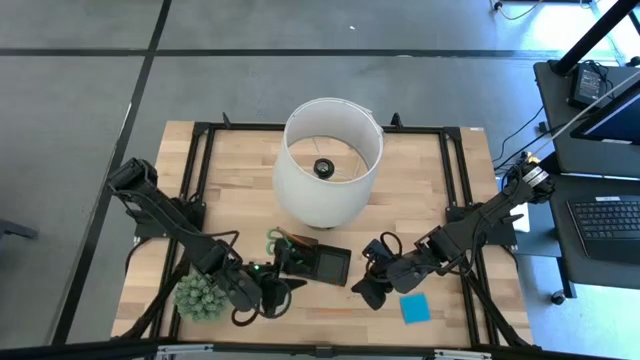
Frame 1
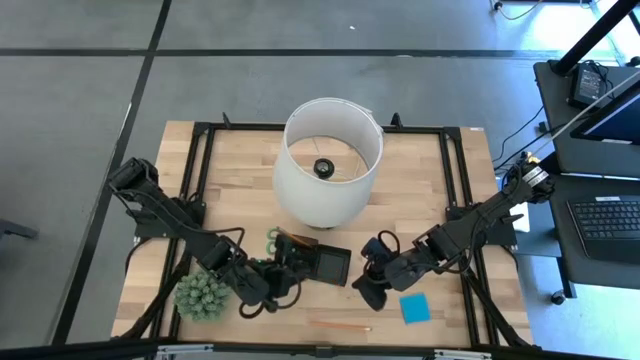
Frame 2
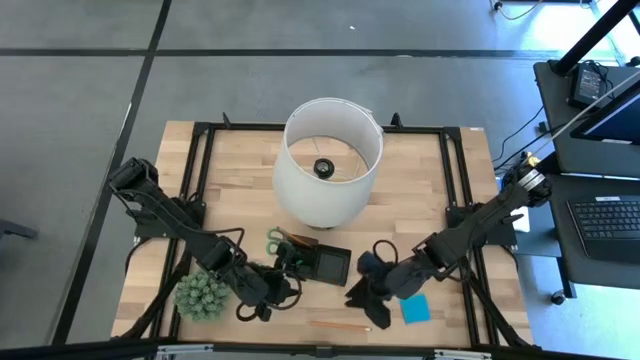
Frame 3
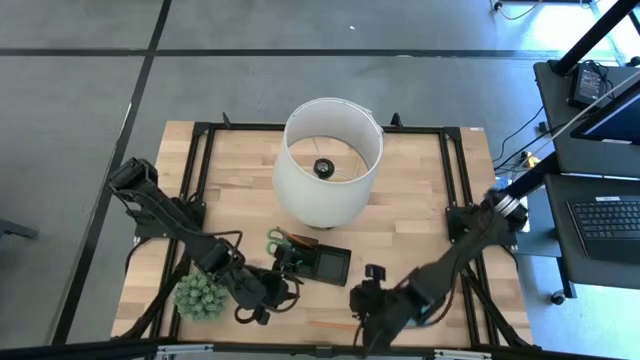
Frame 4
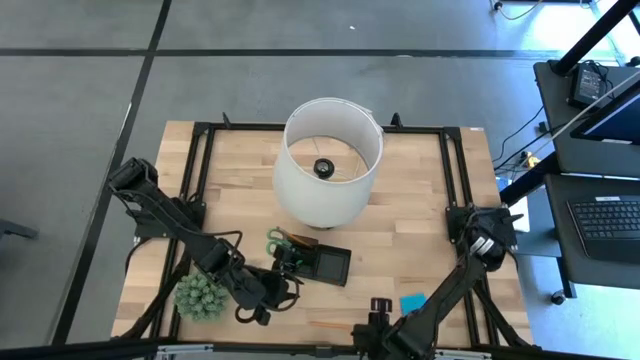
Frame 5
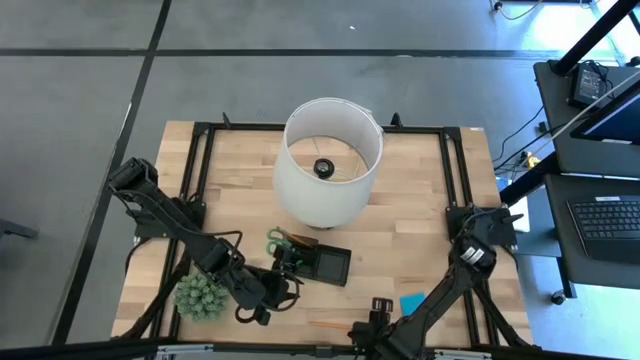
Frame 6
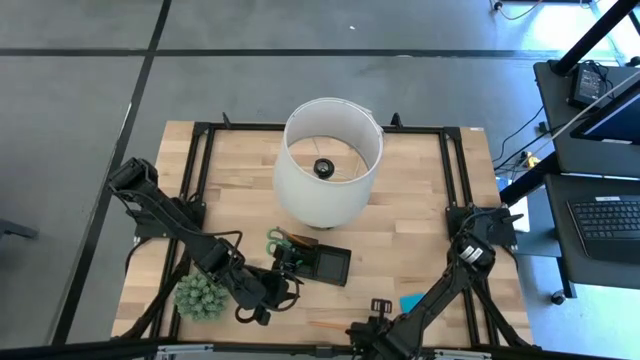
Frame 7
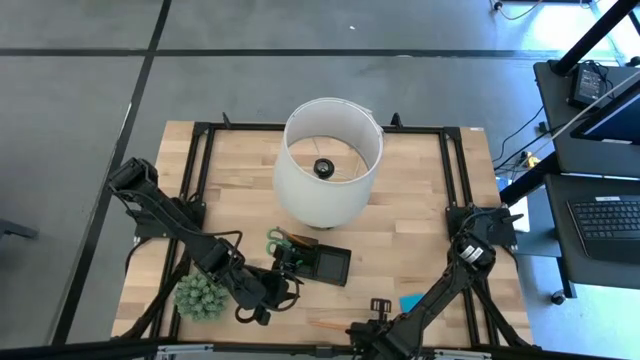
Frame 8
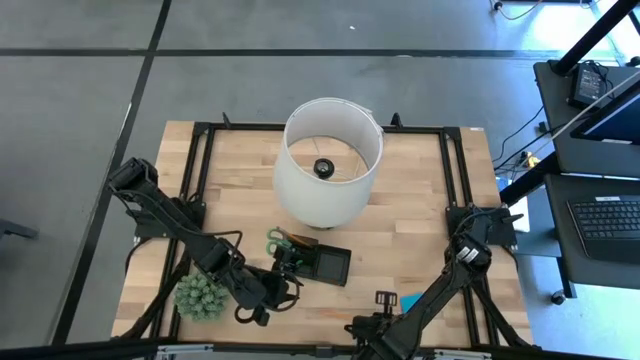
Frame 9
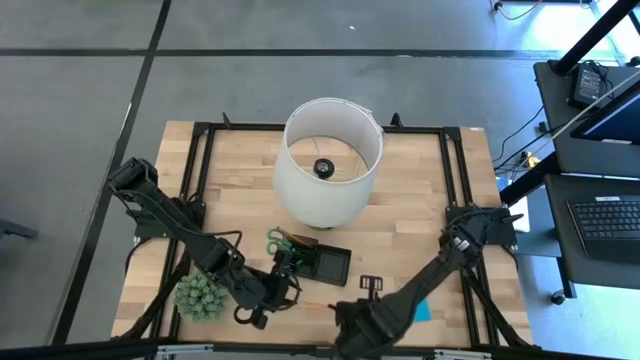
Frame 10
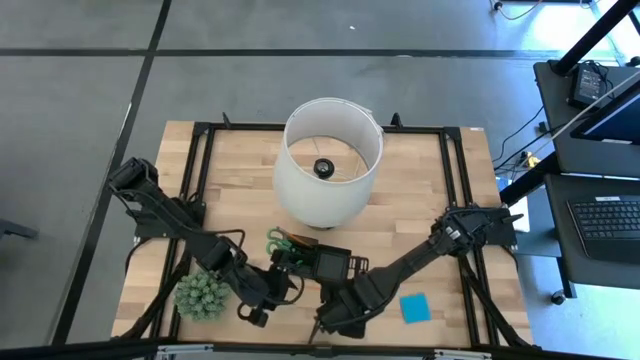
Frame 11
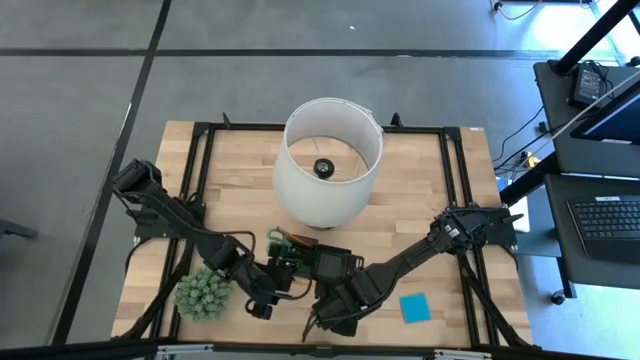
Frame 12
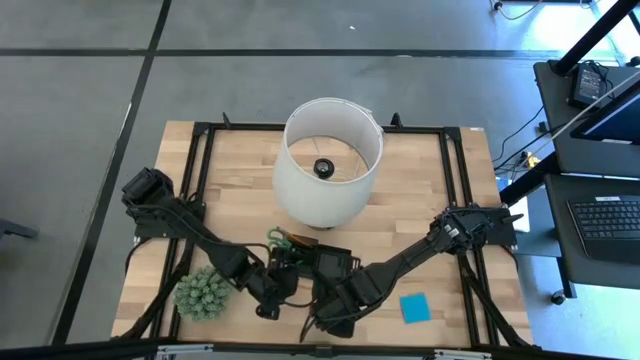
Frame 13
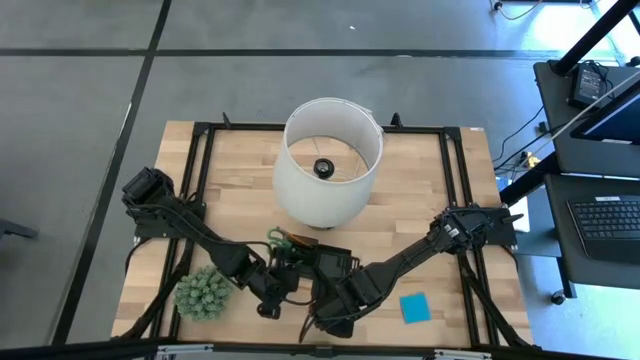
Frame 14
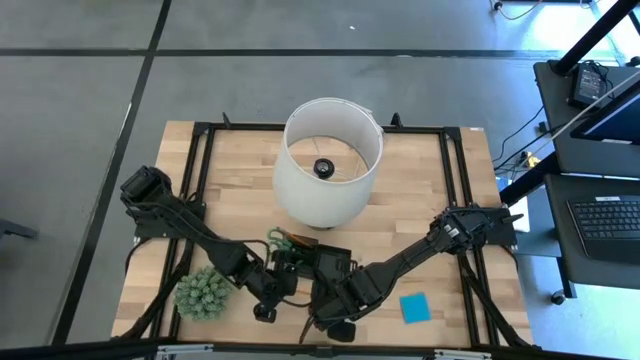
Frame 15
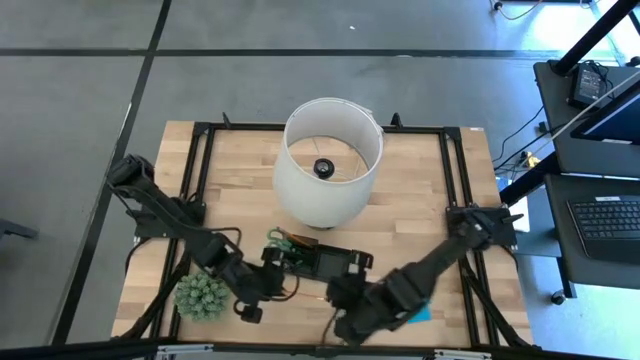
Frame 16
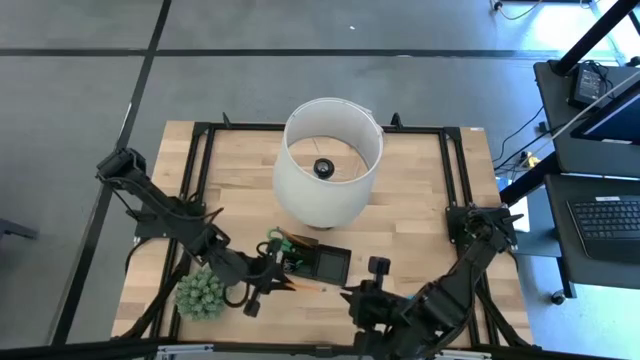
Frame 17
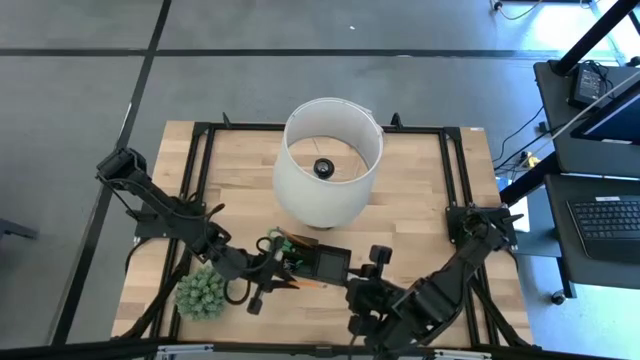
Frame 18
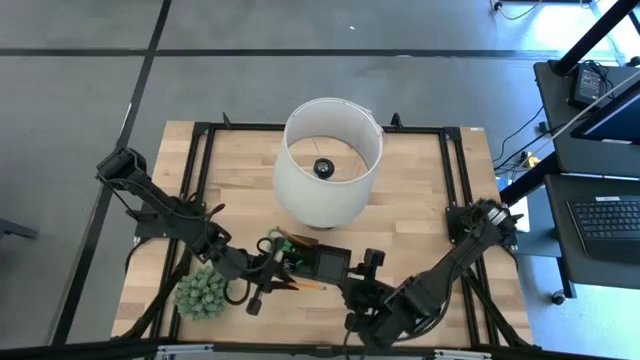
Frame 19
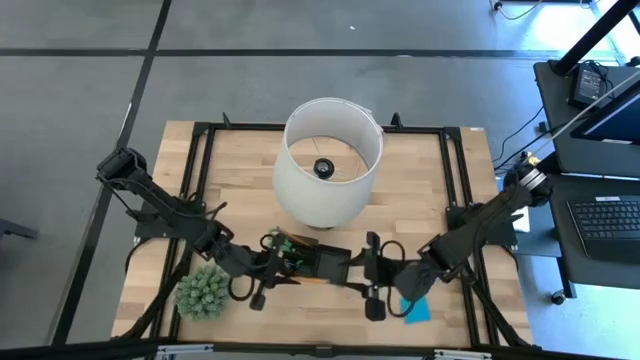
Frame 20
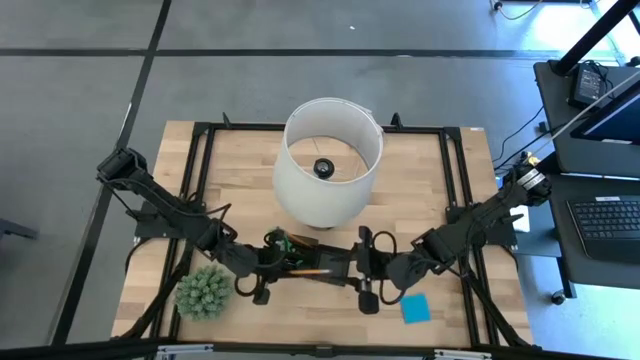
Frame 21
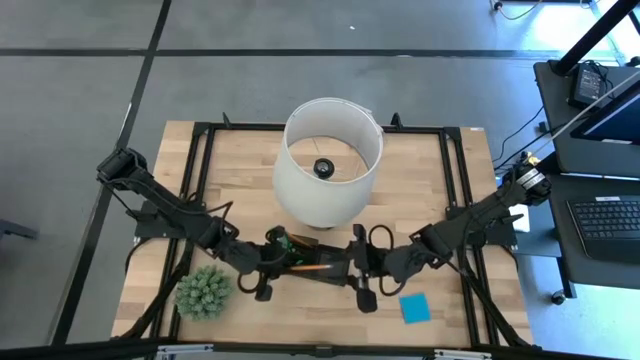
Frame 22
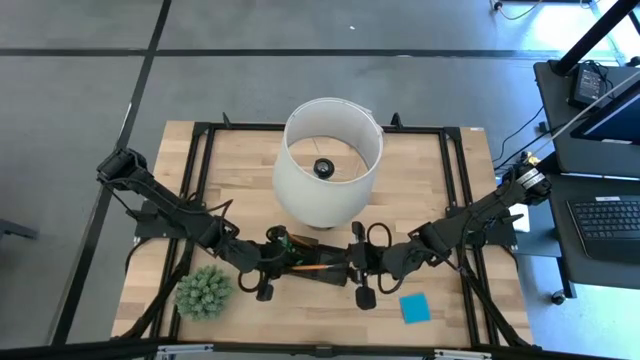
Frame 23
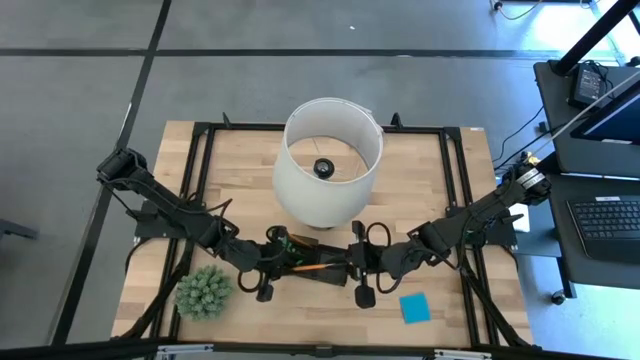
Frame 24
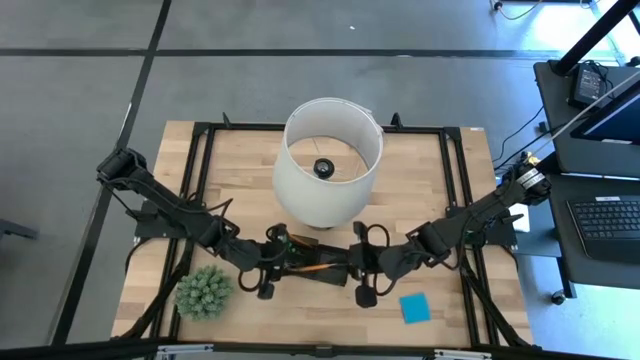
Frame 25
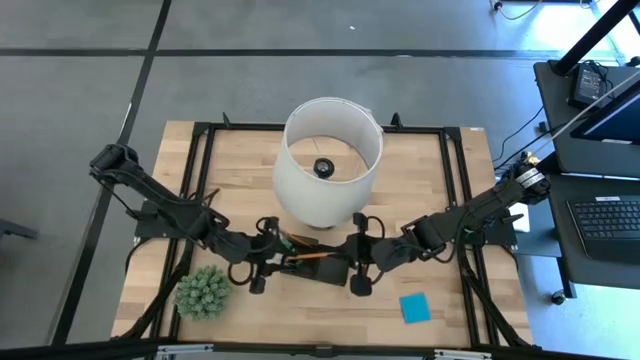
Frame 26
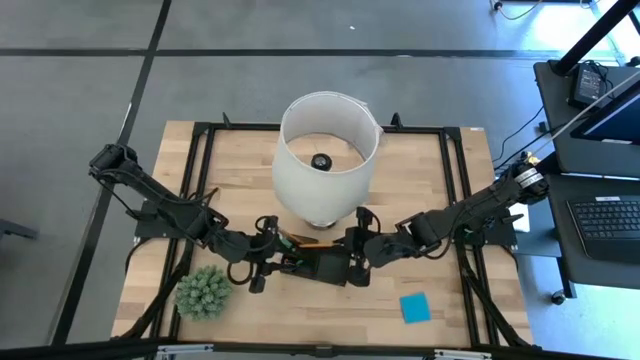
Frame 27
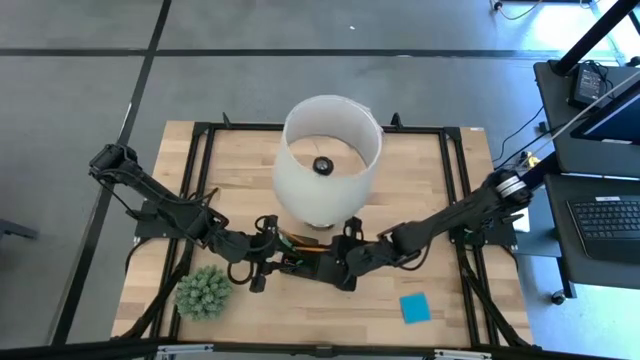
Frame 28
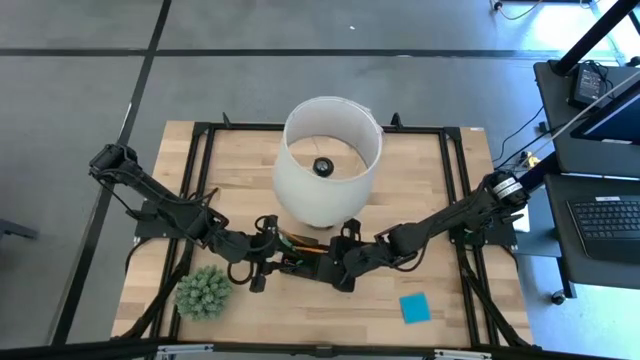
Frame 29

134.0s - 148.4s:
Task: Pick and place office supplies into organizer
Put the orange pencil into the black desk organizer

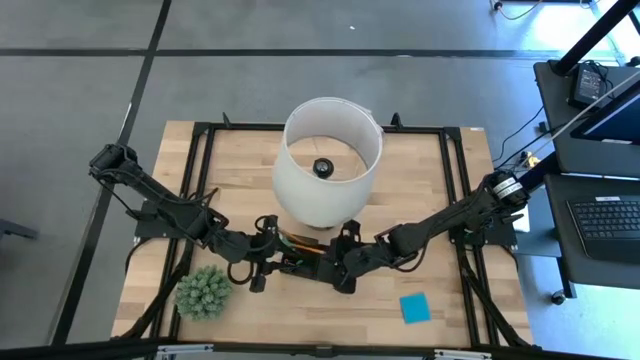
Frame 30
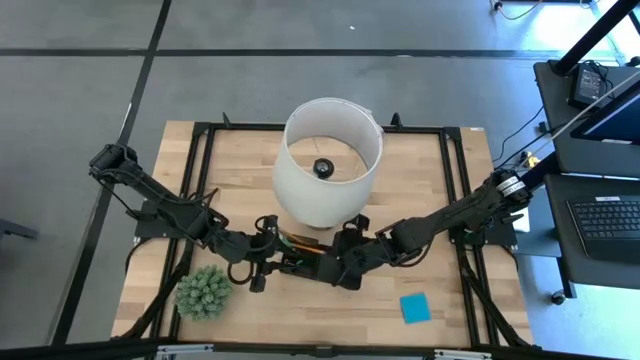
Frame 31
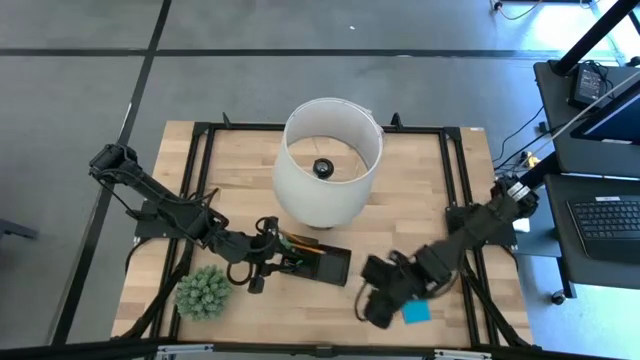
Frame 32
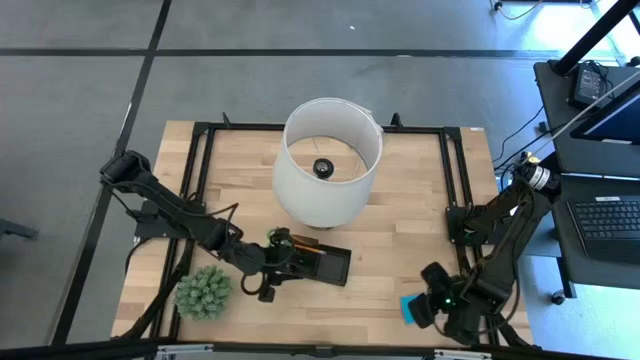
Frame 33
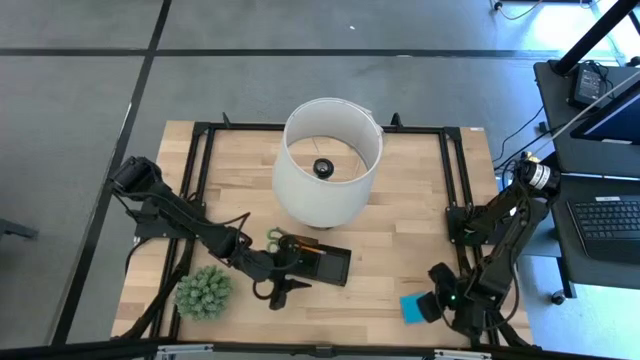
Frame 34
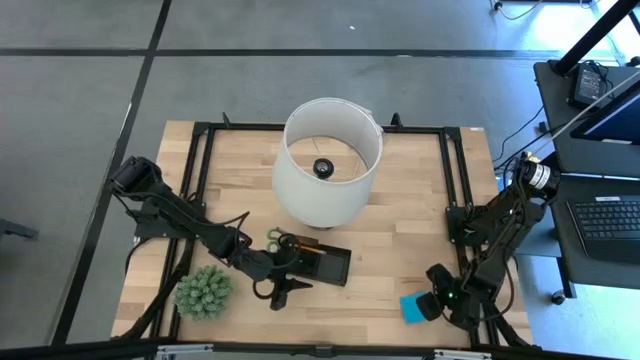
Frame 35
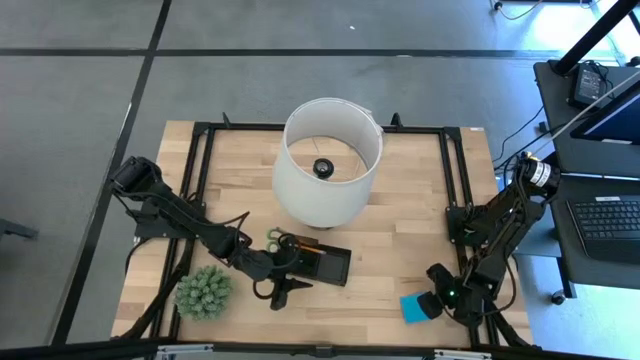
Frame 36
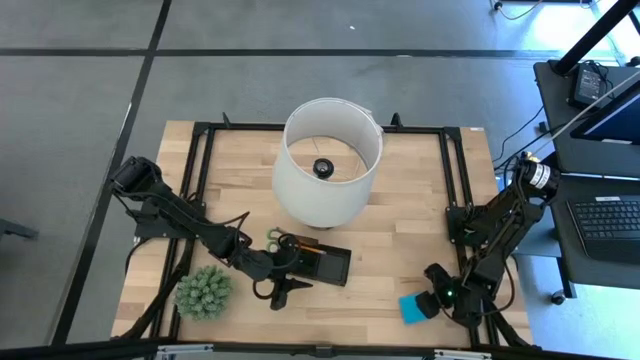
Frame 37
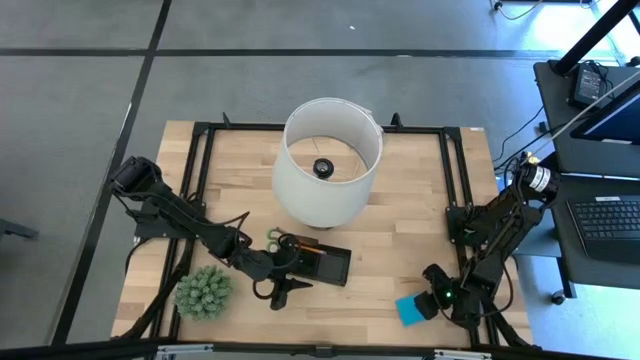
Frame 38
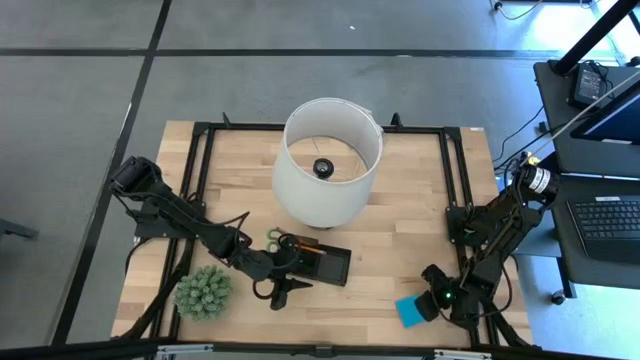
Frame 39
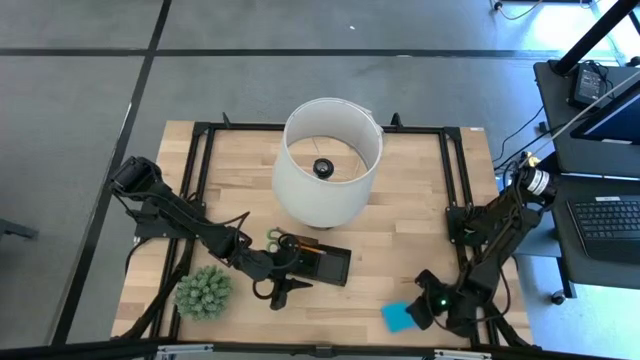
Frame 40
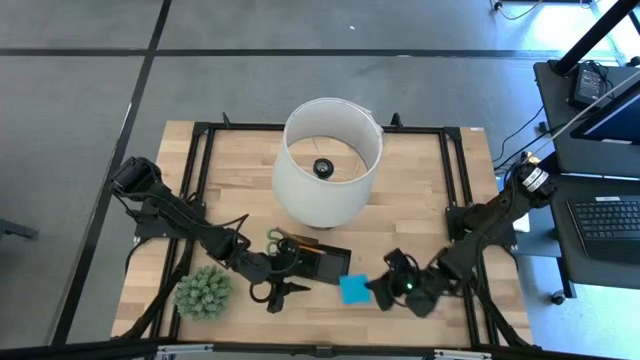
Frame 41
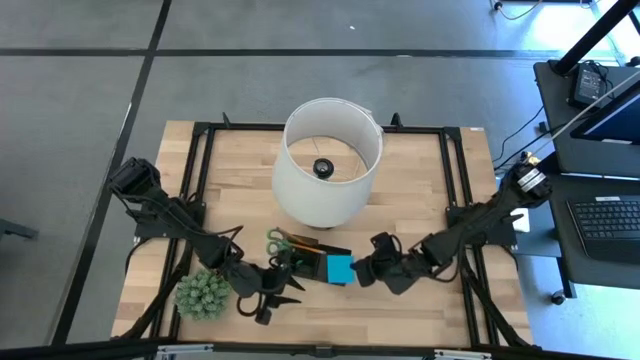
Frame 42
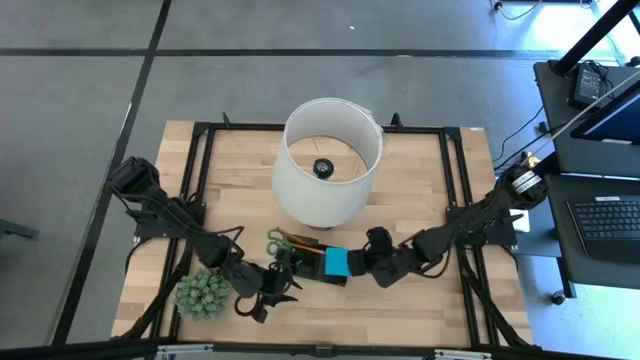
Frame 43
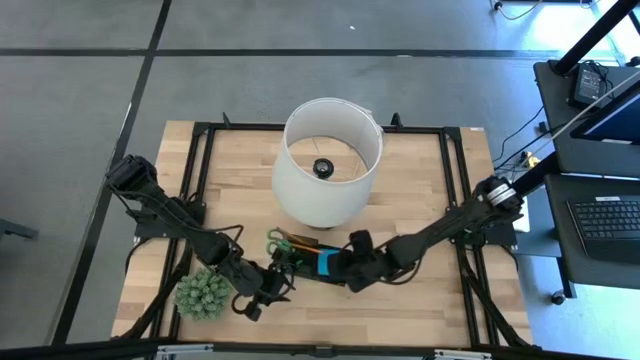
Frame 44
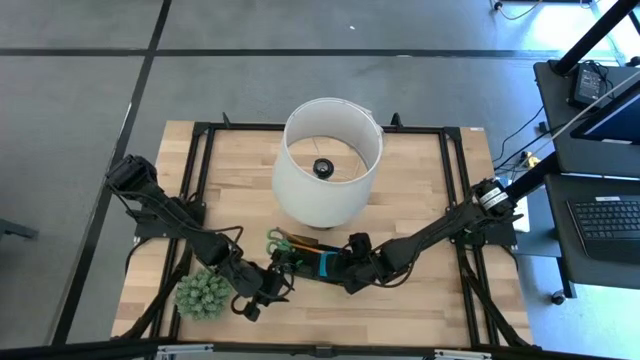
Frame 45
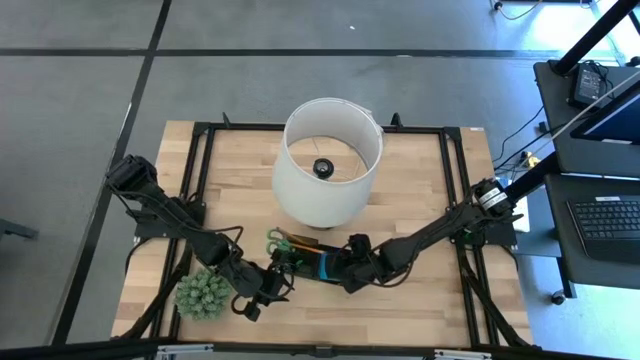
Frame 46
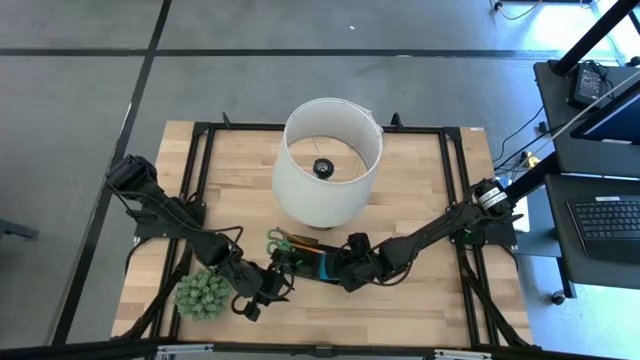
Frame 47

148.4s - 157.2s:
Put the blue sticky notes pad into the black desk organizer
